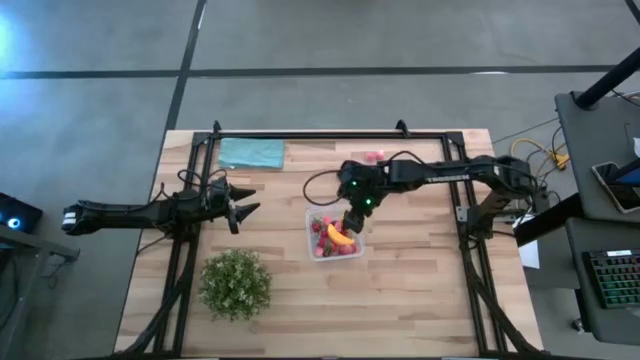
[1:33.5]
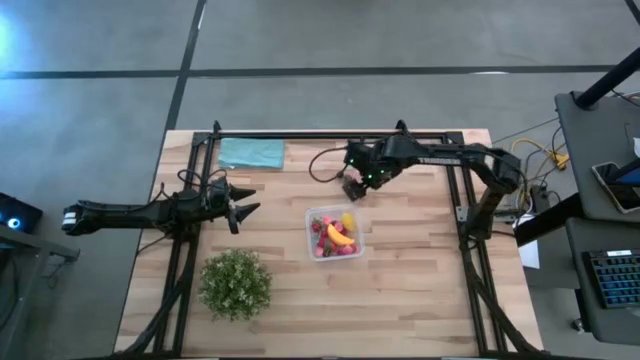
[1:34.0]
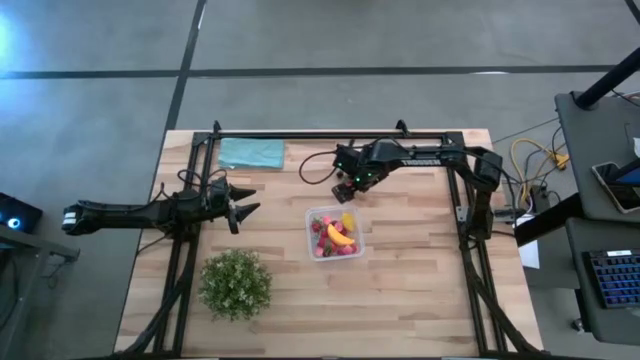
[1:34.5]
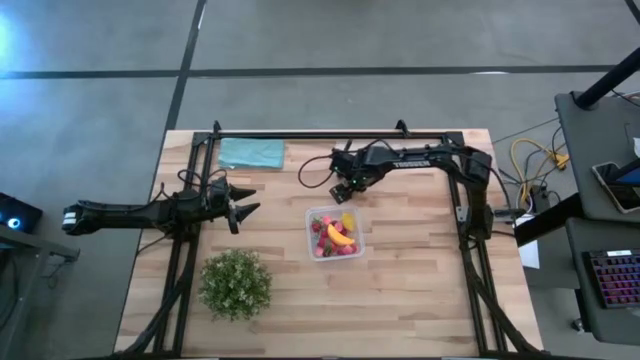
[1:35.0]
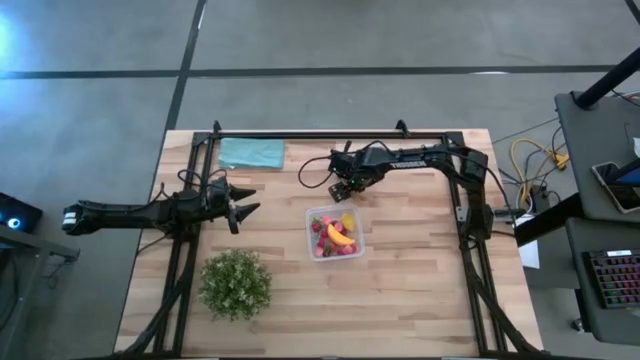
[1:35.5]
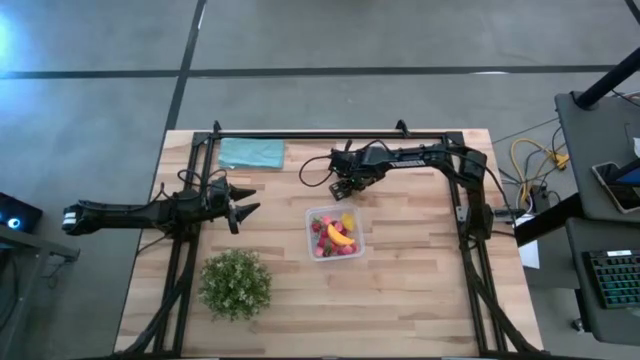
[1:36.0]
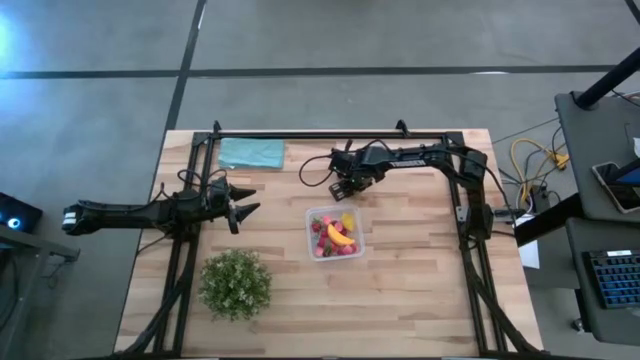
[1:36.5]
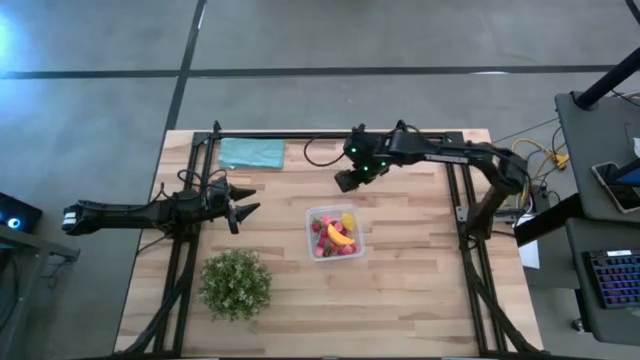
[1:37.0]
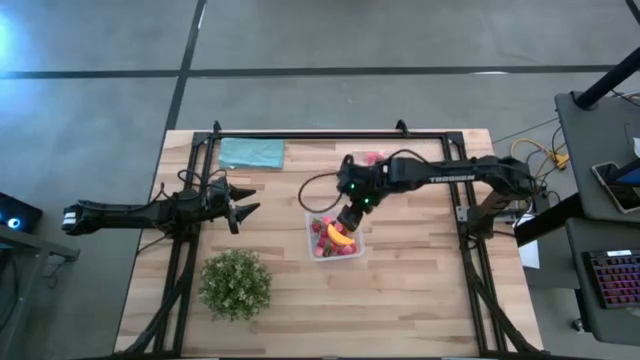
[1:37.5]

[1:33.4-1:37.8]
Task: Pick and placing Produce into tupperware
Put the strawberry into the transparent container

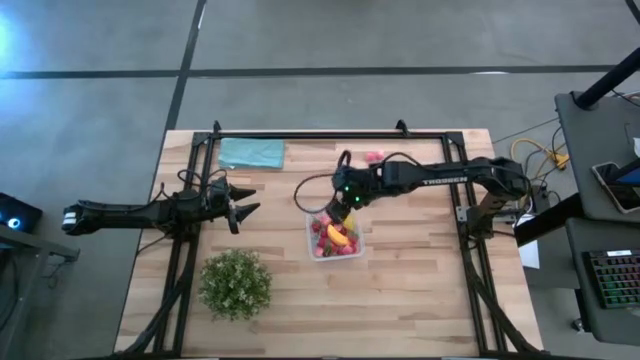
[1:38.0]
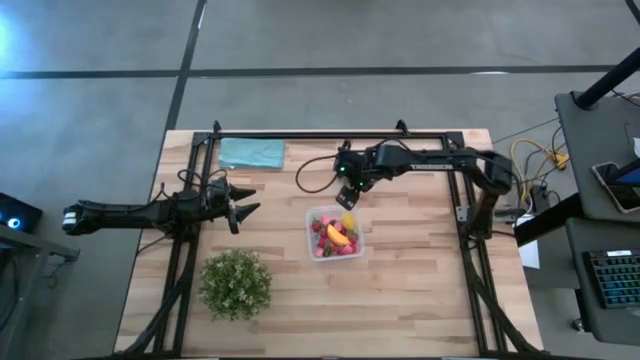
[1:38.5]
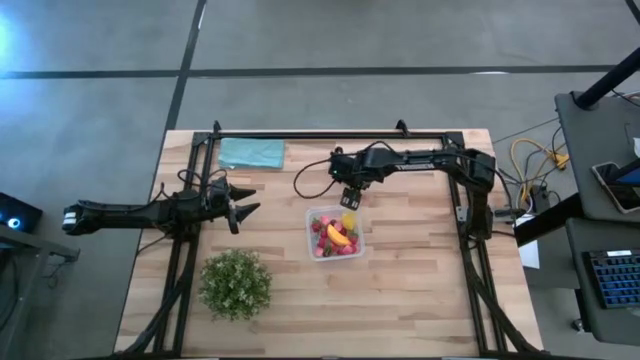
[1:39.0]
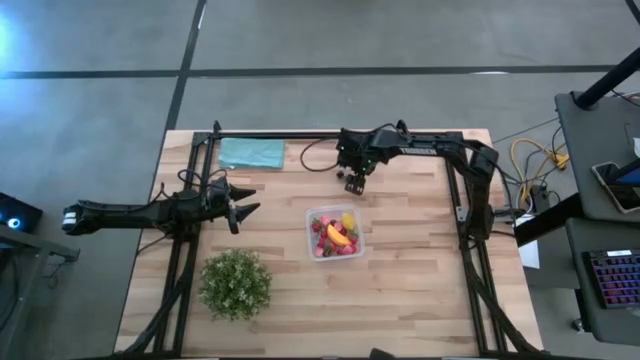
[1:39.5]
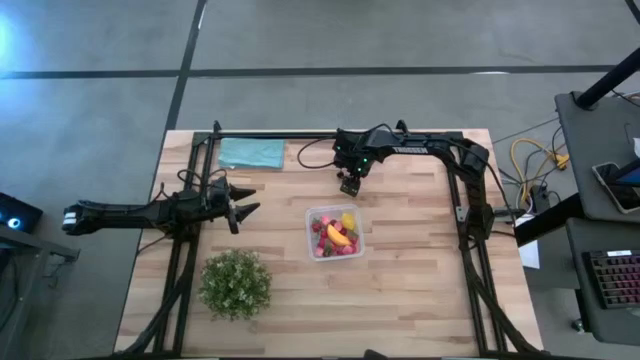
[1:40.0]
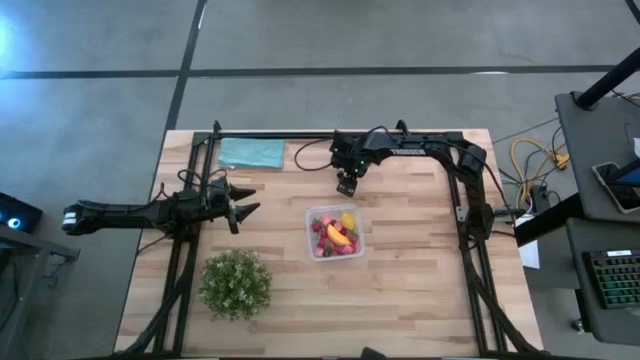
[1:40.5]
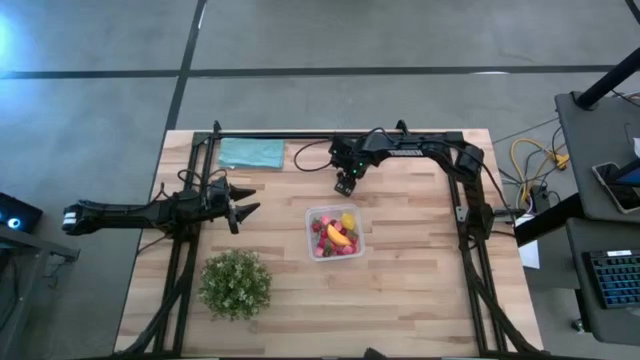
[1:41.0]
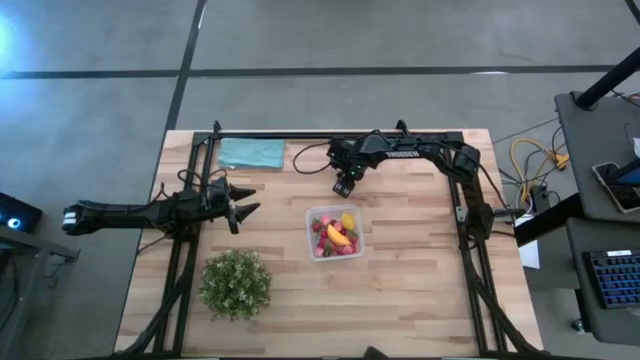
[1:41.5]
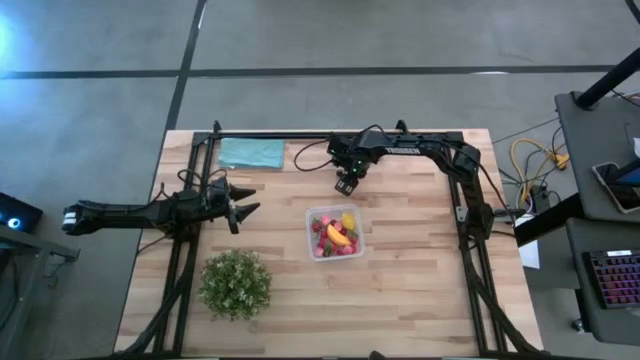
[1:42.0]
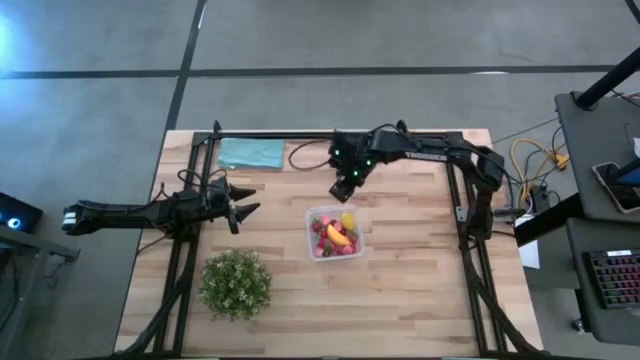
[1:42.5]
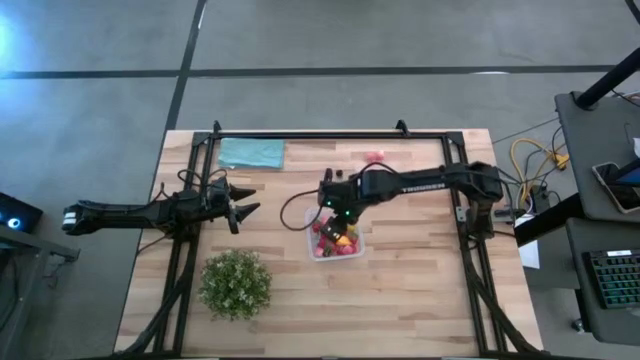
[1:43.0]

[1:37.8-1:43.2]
Put the strawberry into the transparent container

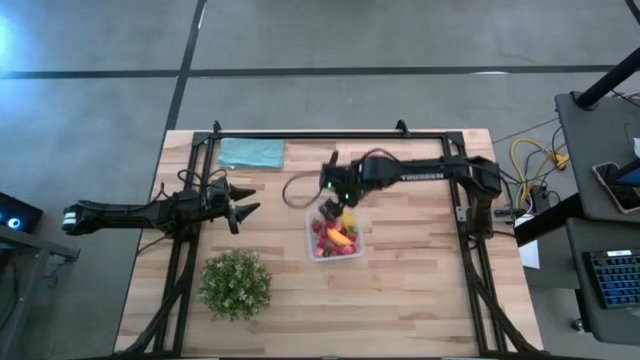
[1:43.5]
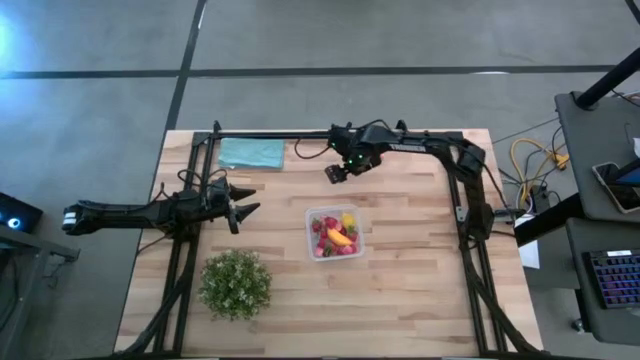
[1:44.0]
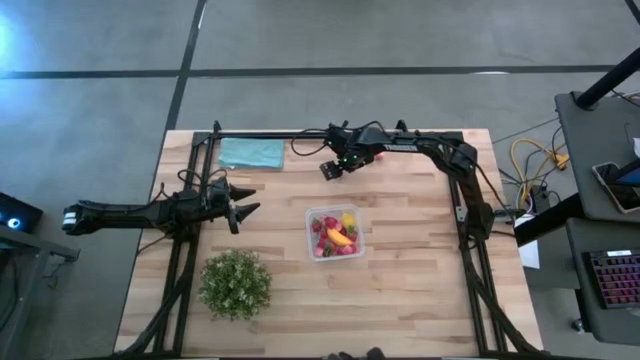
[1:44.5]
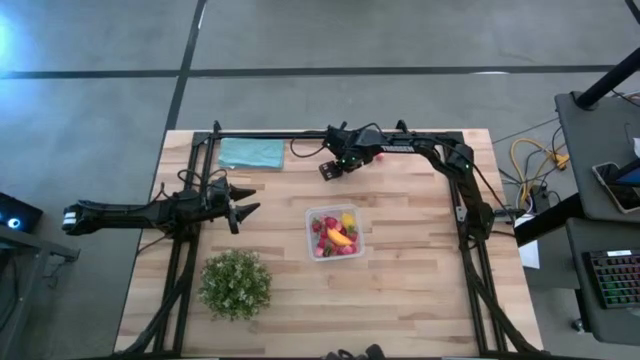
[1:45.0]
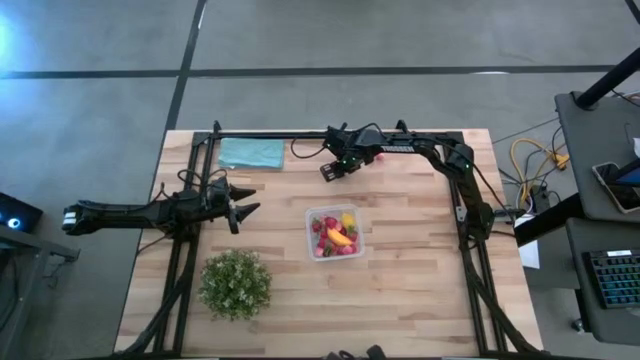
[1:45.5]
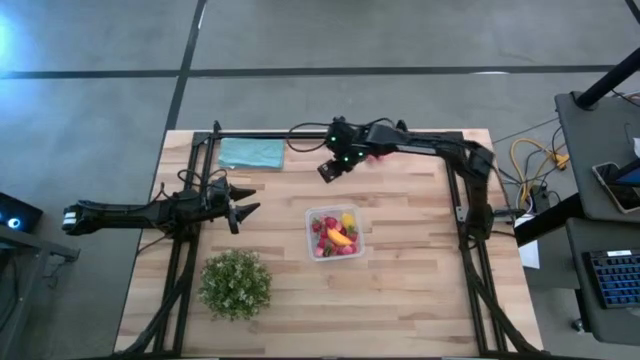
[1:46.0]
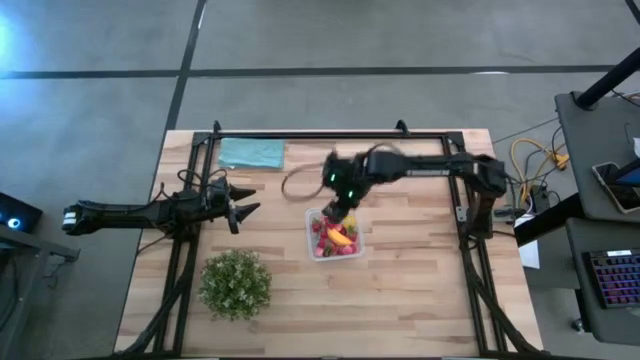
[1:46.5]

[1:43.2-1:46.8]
Put the black cherry into the transparent container

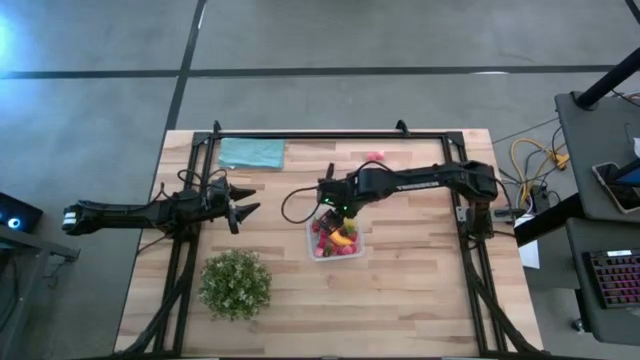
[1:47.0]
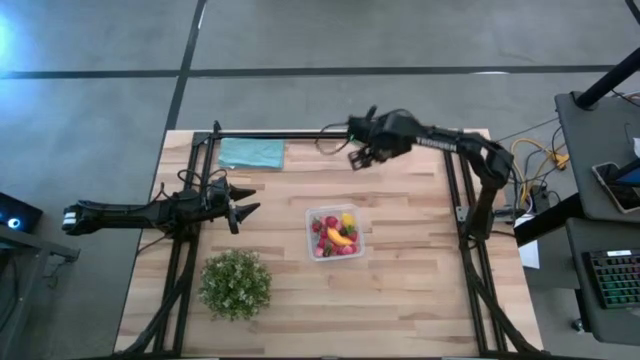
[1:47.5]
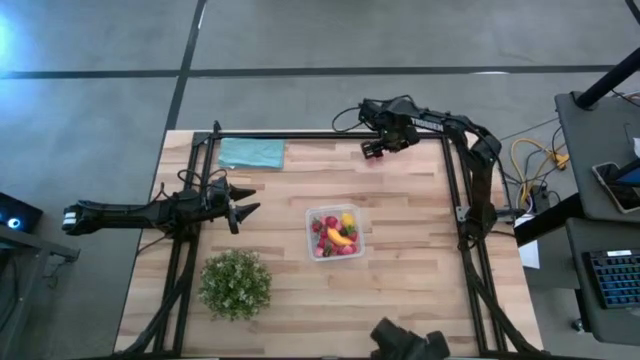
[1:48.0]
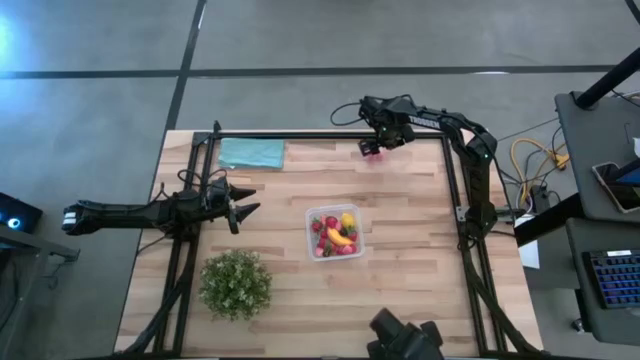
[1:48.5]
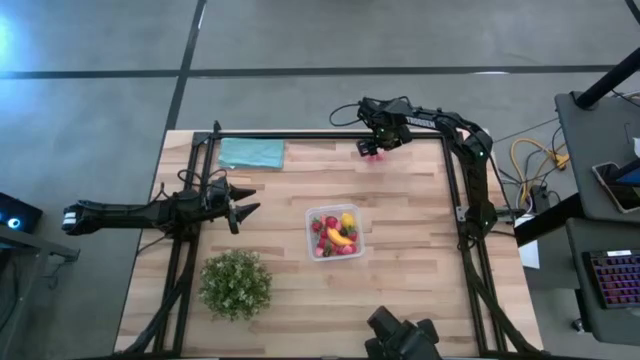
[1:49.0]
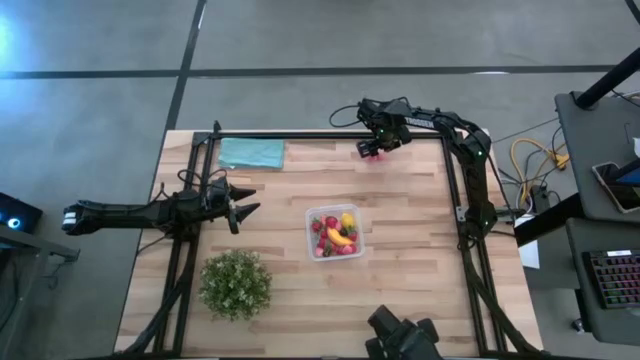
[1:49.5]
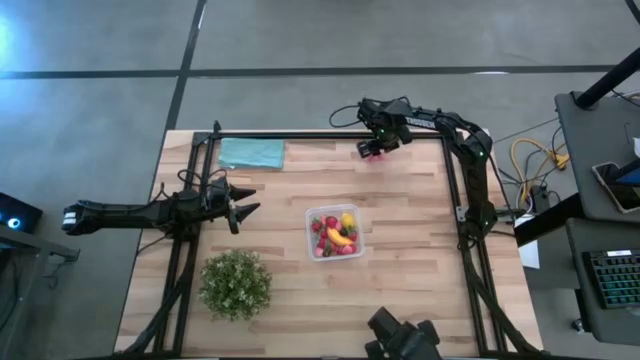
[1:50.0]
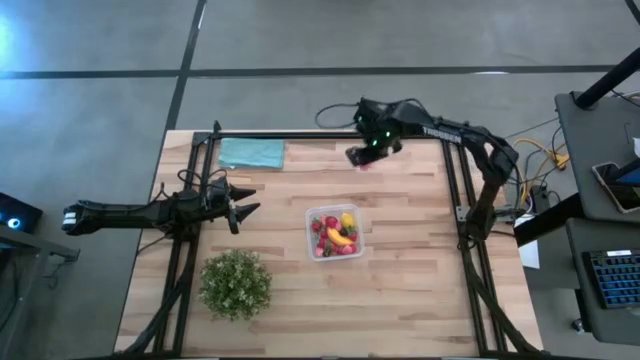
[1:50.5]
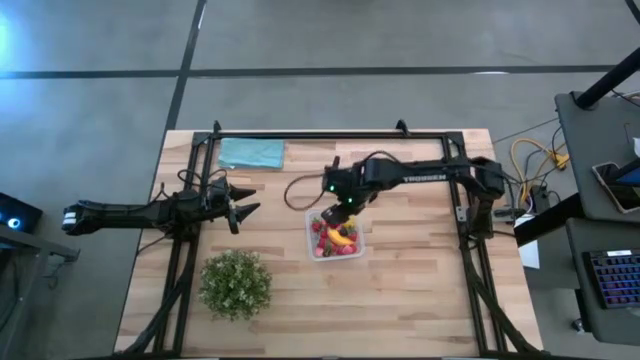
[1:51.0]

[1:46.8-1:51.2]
Put the peach into the transparent container

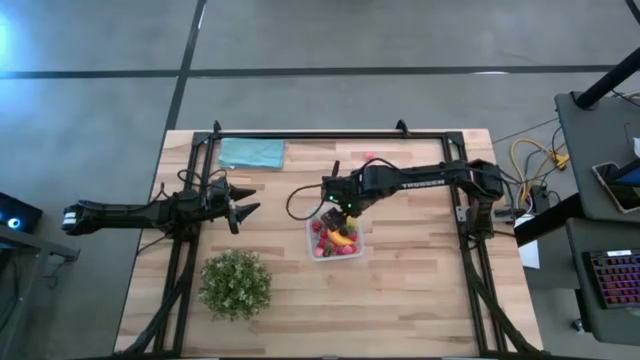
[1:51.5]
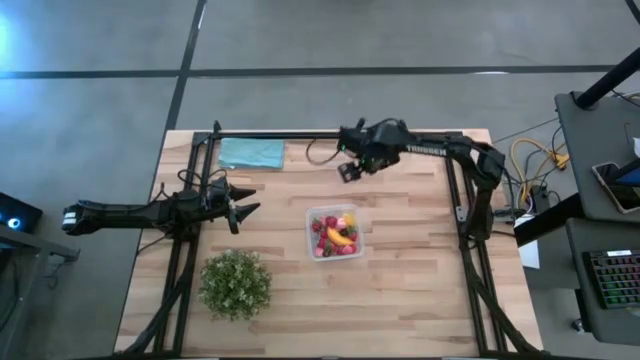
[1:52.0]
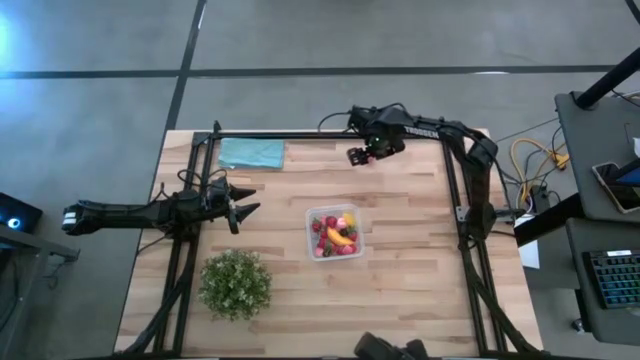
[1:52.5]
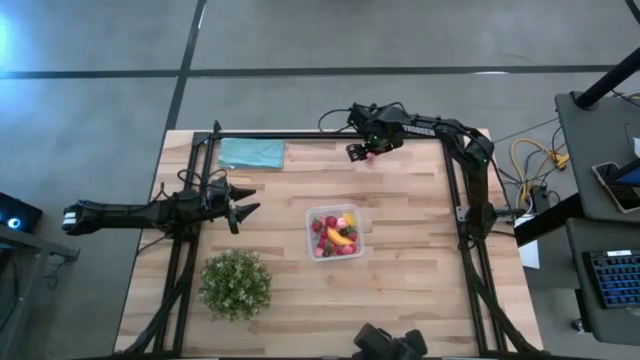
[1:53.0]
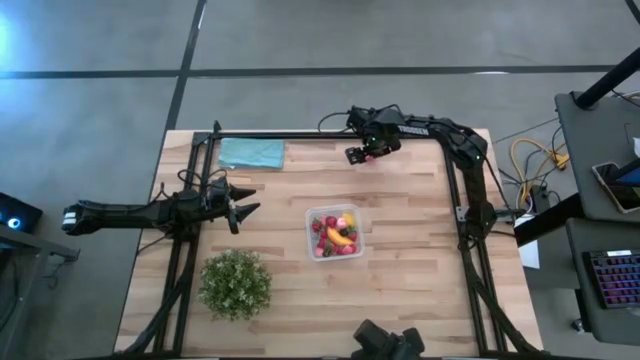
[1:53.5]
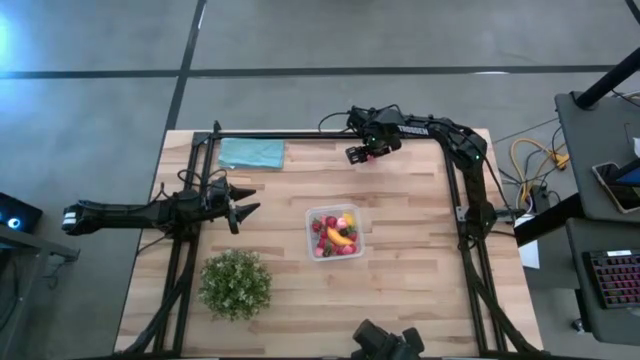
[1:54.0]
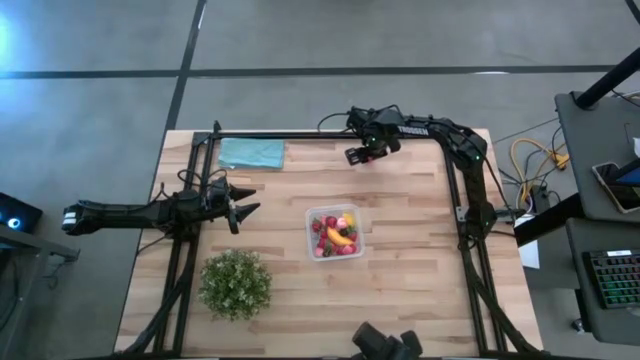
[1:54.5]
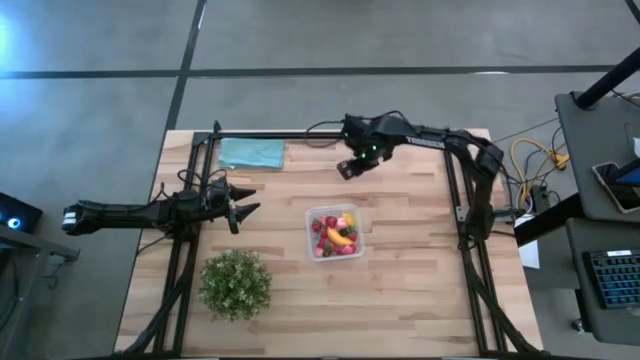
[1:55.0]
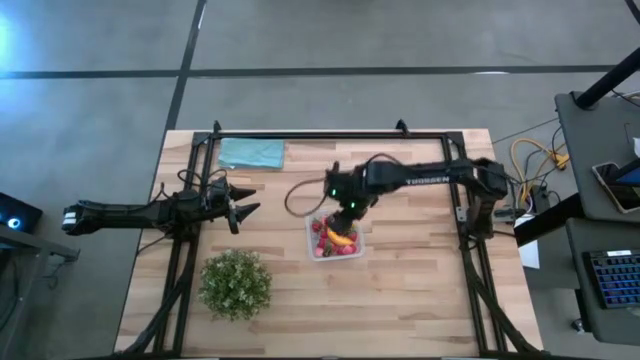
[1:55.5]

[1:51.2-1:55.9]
Put the peach into the transparent container
